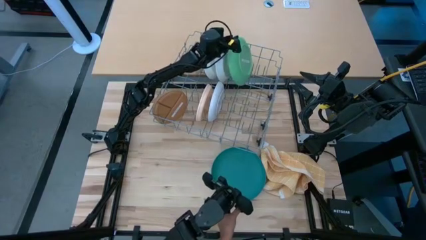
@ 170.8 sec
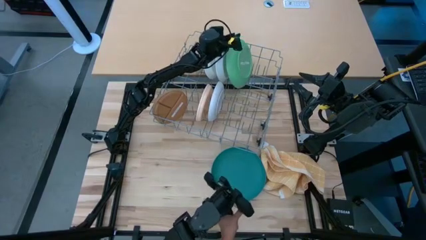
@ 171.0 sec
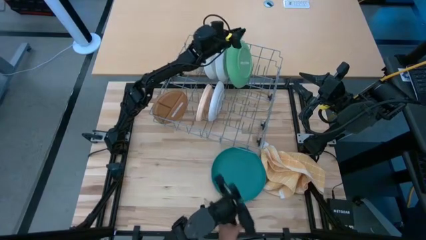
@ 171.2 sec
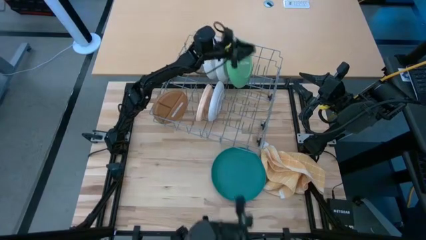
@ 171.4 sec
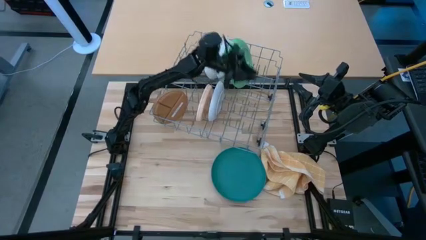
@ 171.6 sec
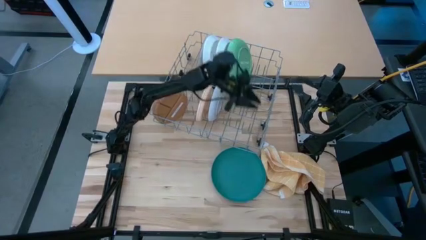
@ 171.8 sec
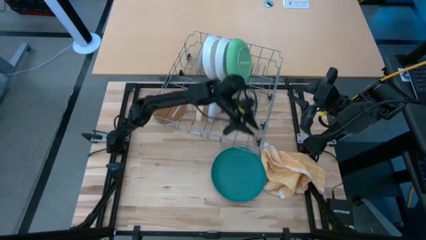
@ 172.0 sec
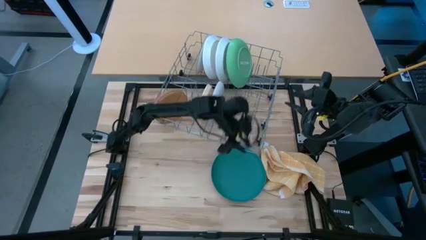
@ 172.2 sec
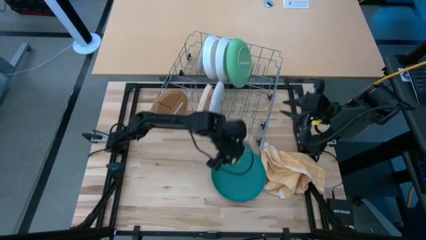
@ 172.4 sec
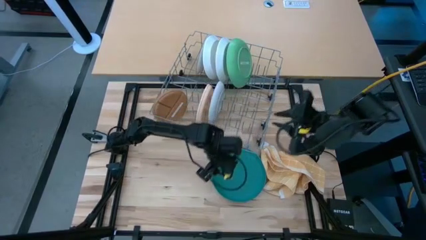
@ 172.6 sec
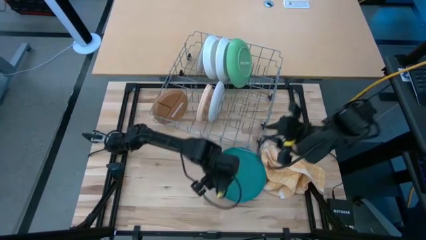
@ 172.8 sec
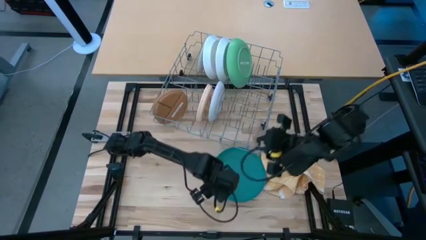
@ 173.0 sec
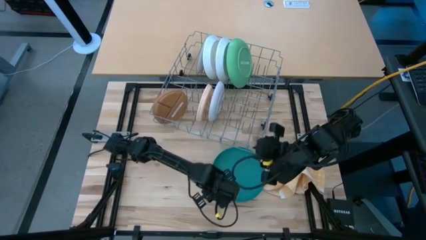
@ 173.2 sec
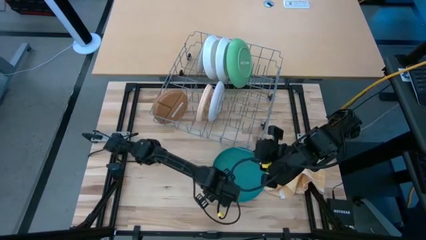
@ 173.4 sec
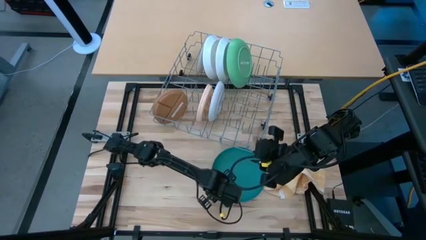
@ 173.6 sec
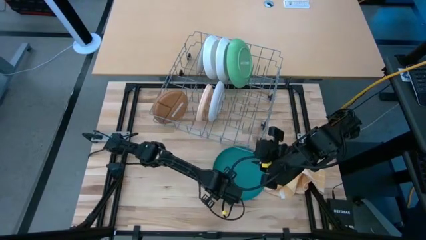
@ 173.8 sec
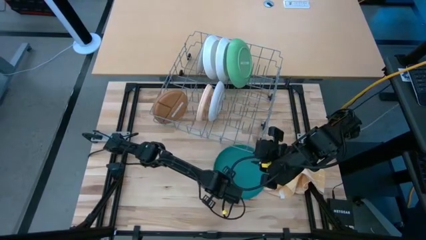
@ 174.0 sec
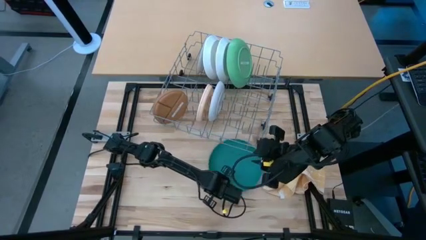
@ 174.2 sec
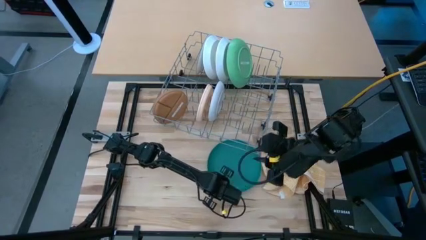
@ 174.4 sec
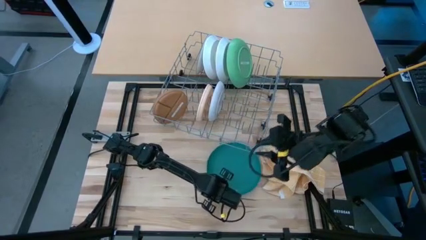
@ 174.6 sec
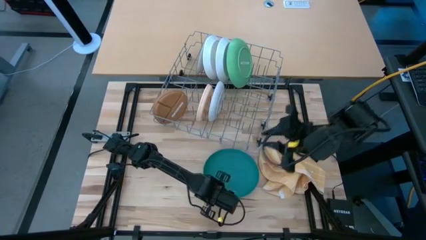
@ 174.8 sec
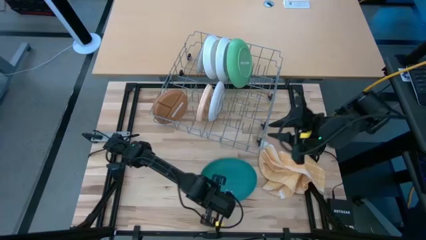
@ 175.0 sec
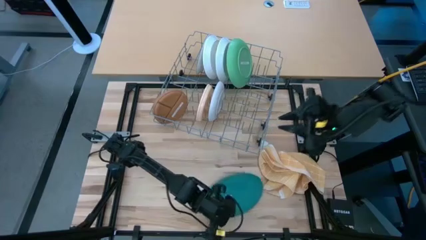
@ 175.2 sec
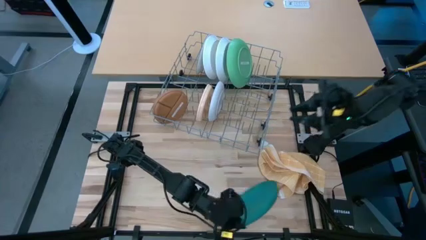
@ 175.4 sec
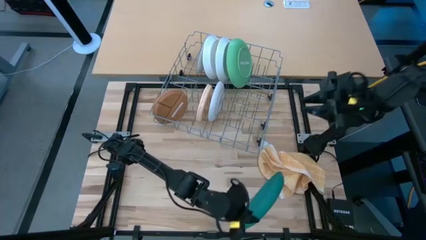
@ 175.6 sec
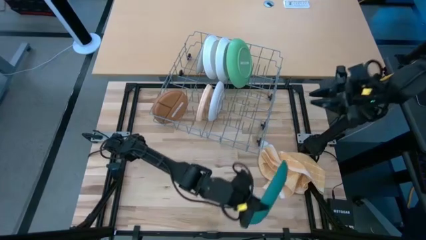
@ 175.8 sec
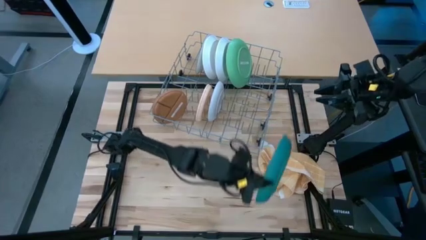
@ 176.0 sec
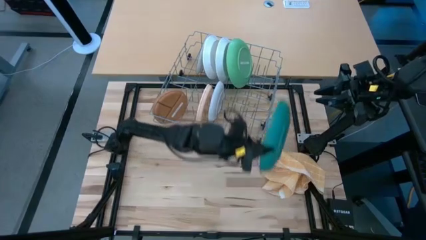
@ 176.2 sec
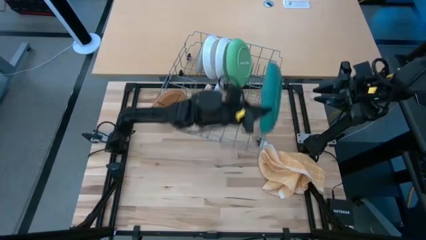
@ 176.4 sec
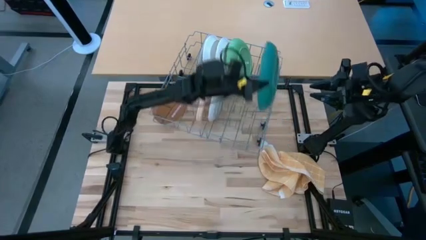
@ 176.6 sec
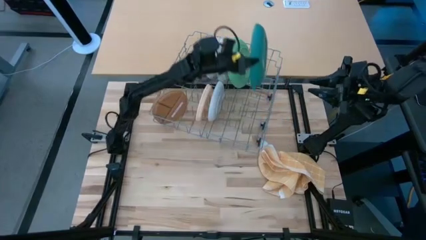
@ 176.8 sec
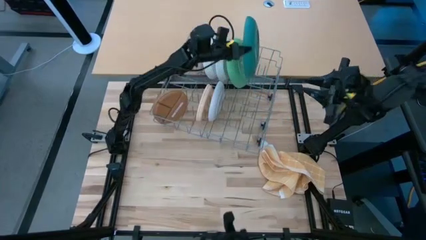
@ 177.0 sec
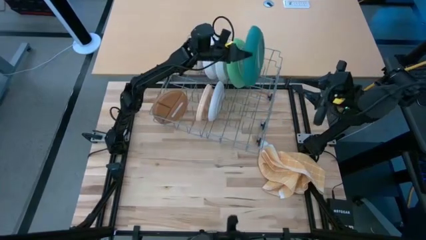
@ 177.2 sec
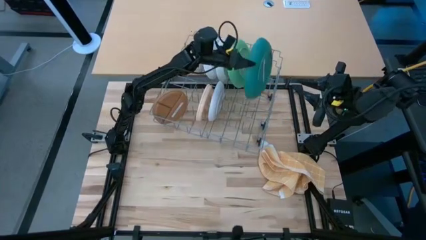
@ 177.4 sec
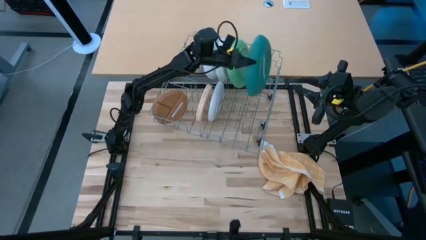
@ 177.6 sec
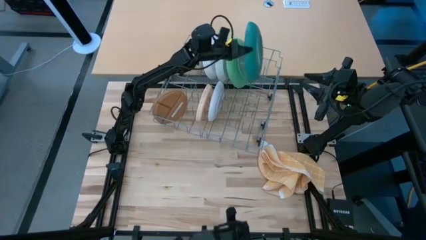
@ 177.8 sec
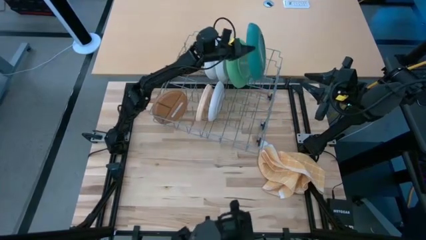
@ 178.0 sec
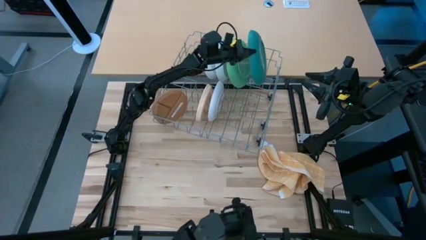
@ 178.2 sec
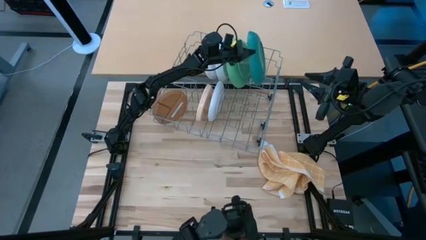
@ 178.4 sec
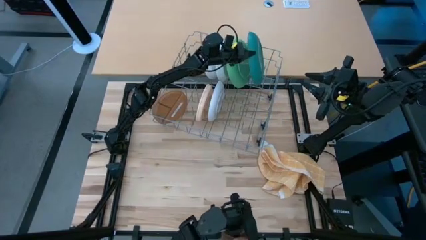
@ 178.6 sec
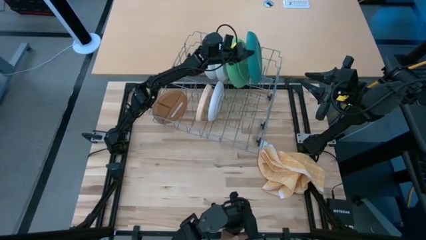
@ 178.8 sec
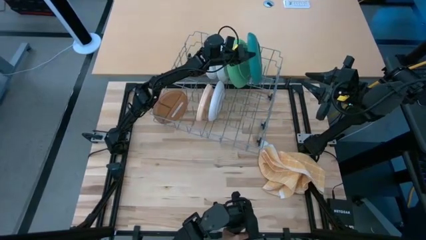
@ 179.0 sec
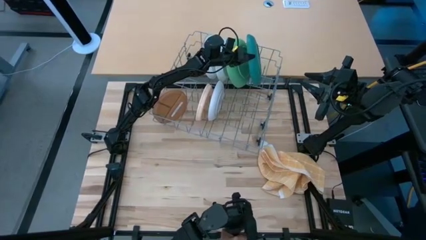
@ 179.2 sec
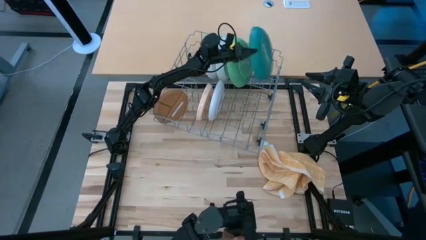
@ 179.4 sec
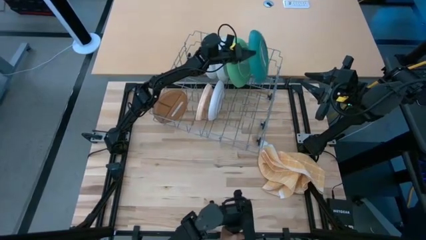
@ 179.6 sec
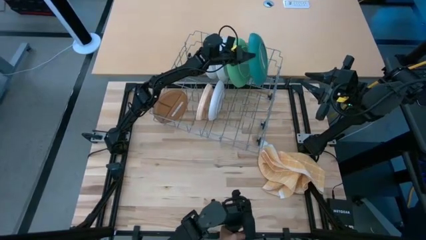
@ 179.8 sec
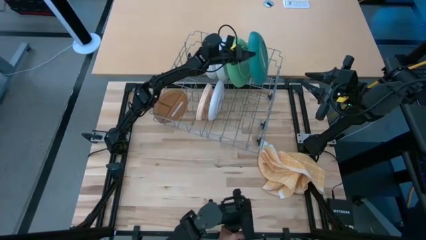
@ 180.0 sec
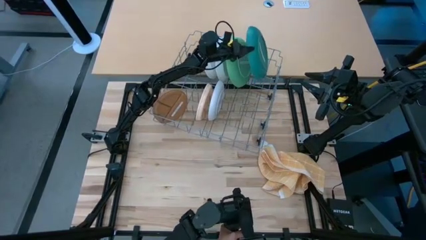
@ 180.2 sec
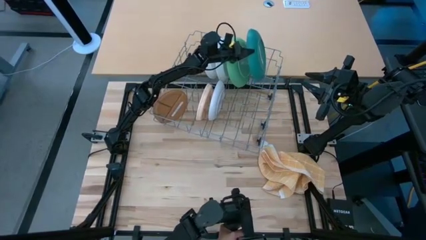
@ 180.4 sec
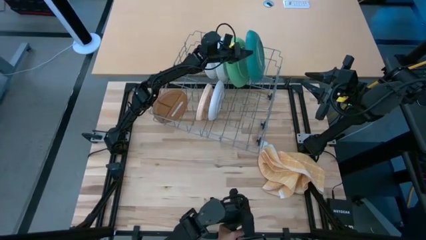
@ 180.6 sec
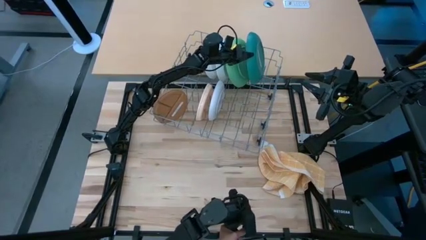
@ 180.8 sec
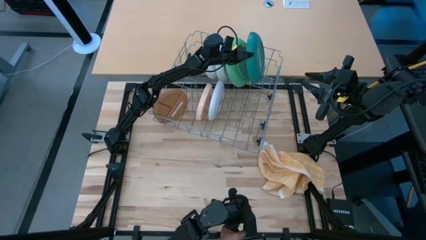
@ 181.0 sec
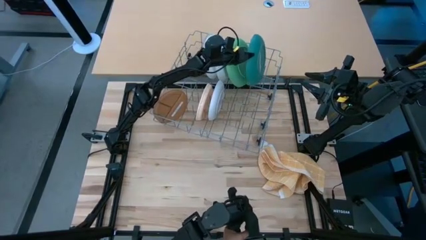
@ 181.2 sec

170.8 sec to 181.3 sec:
Task: Sort dishes
Put the dark green plate in the dish rack
